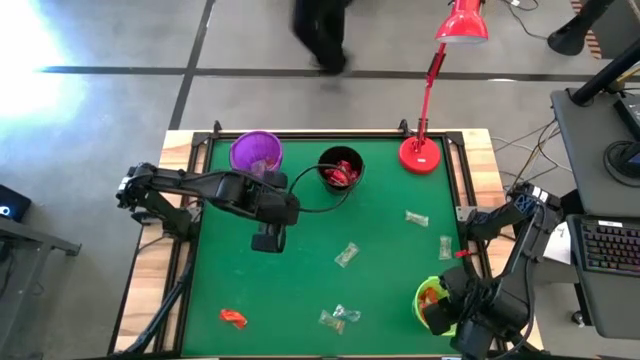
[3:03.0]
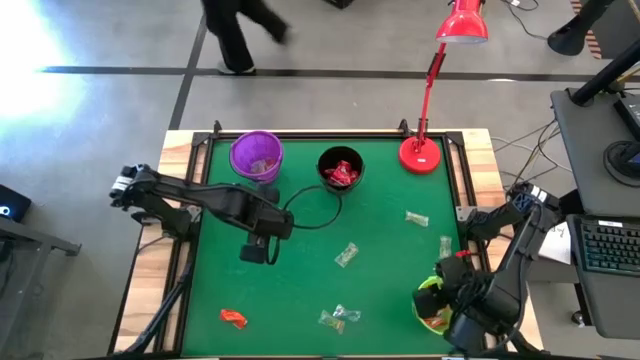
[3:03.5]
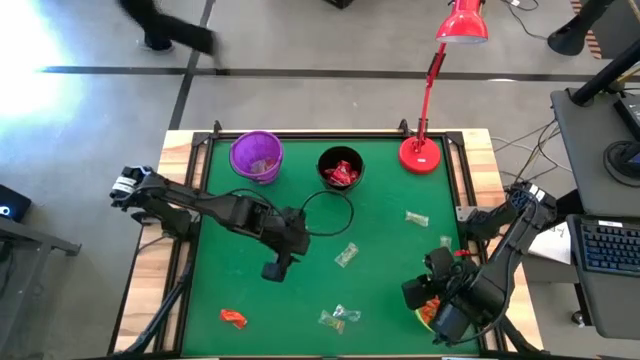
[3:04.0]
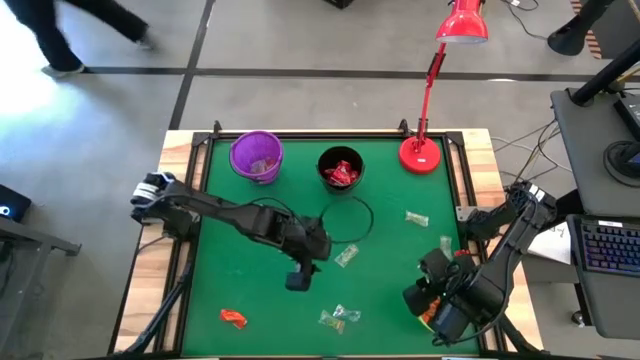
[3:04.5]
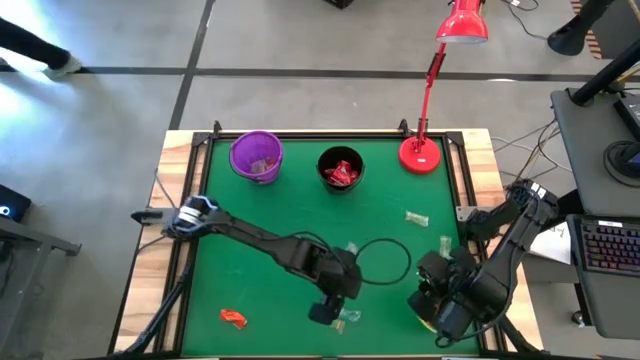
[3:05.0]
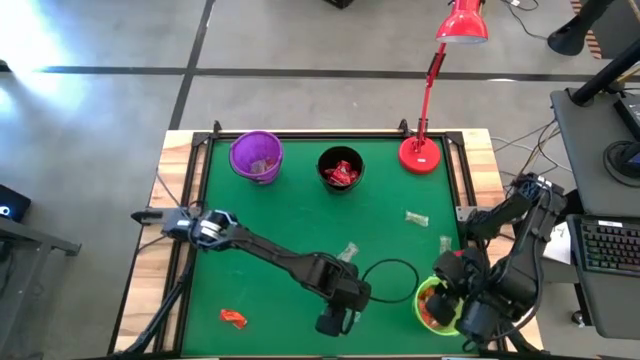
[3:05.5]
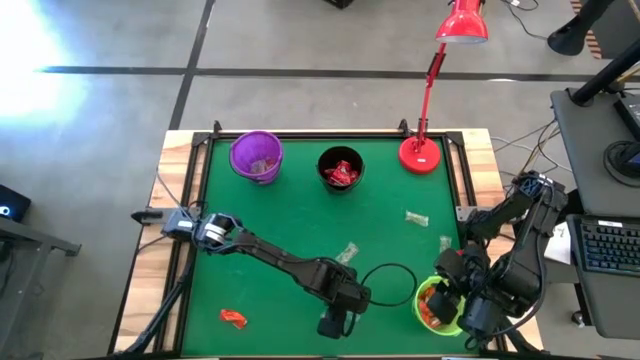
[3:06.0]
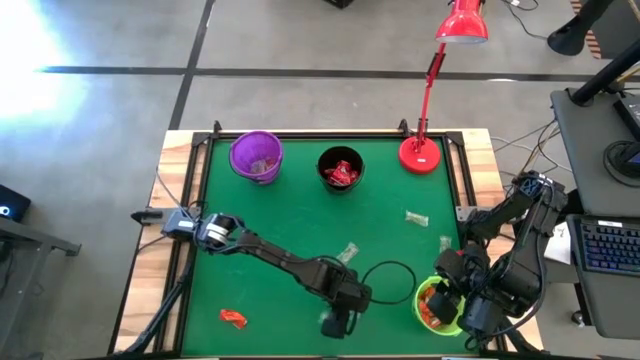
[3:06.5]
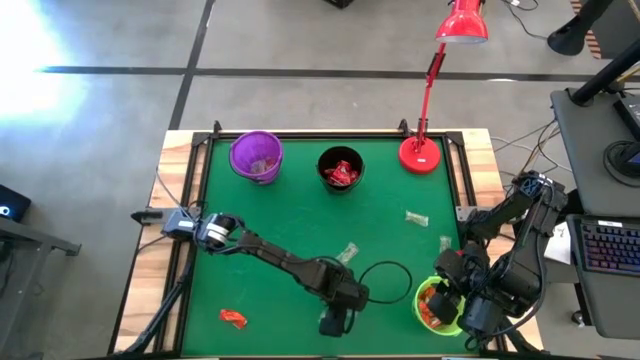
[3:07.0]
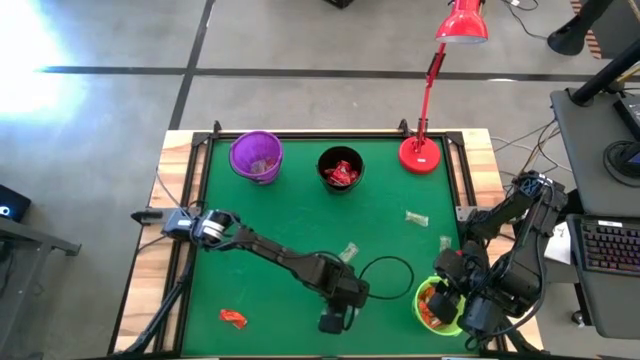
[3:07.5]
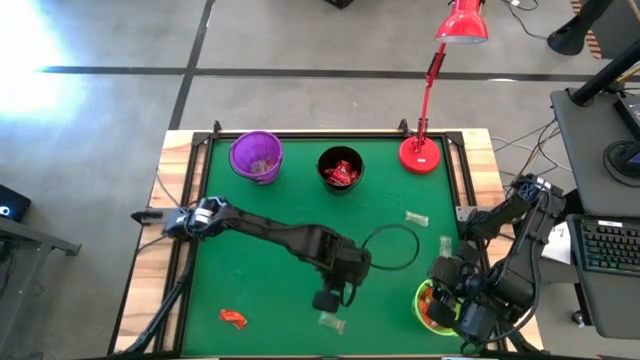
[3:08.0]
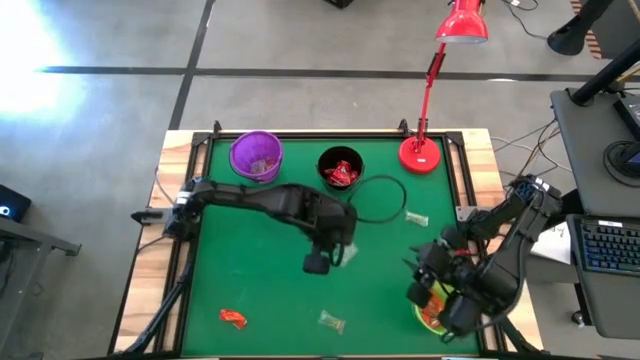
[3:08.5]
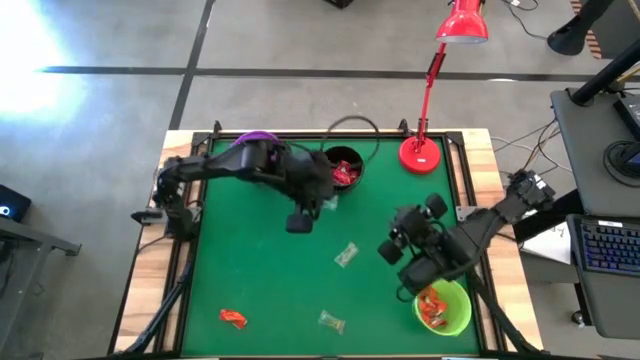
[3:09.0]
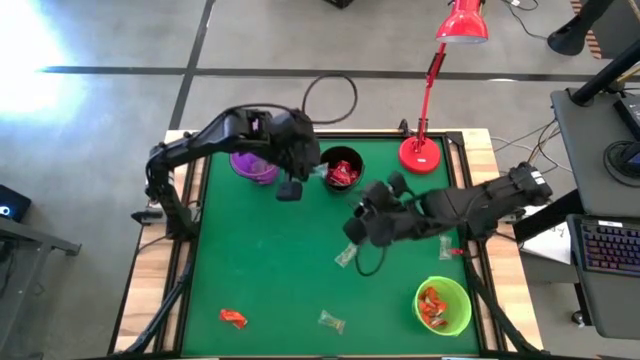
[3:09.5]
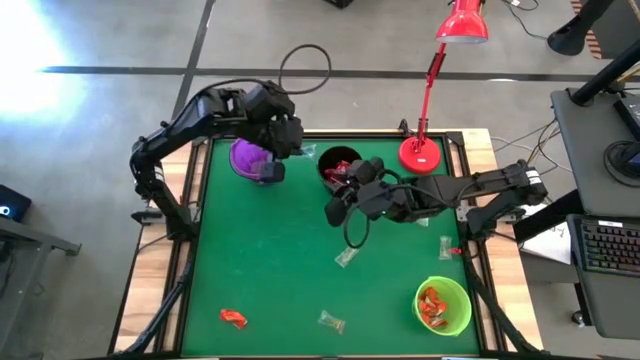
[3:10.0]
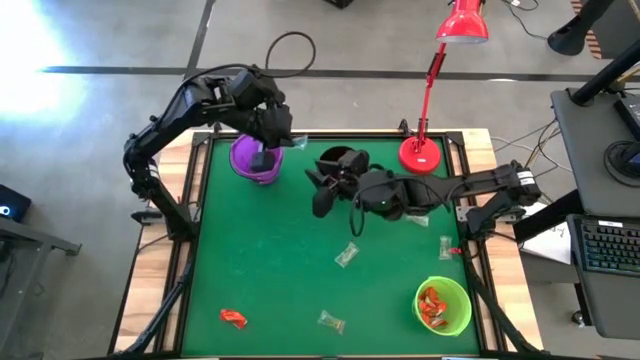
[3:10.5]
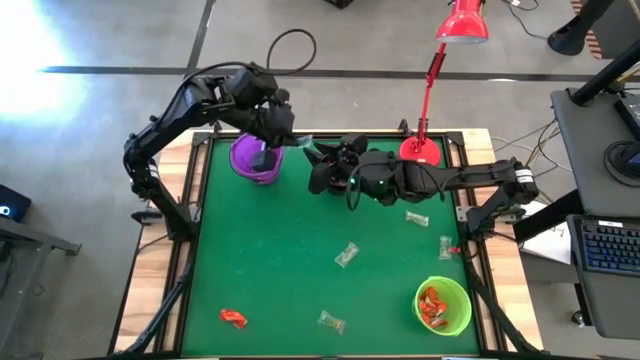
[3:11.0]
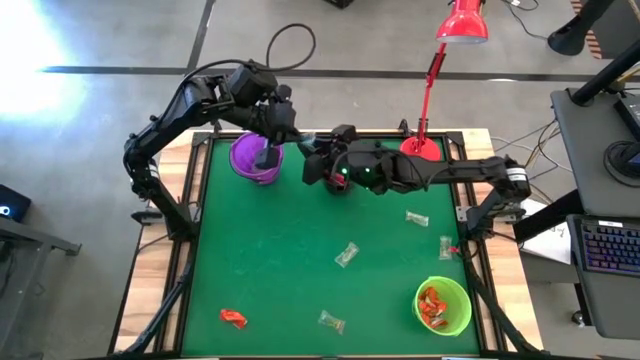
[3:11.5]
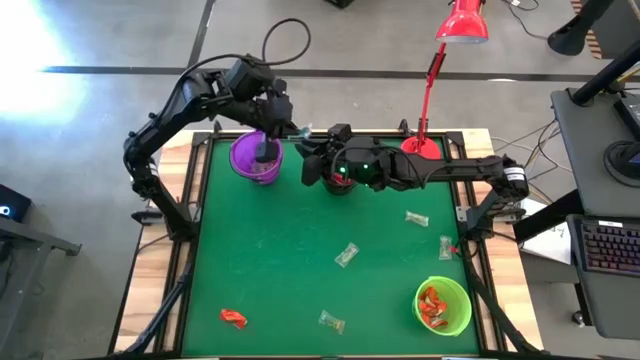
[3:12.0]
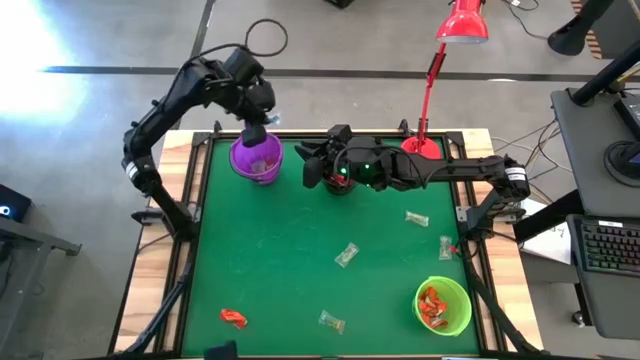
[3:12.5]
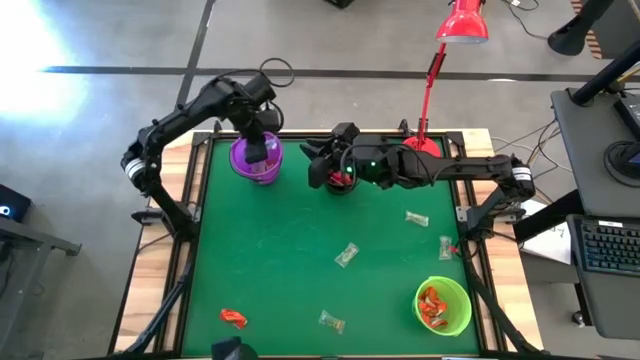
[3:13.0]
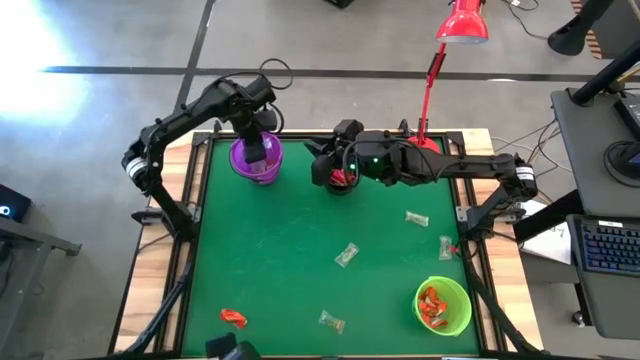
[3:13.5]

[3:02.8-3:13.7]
Task: Sort candy
Put the blue gummy into the violet bucket

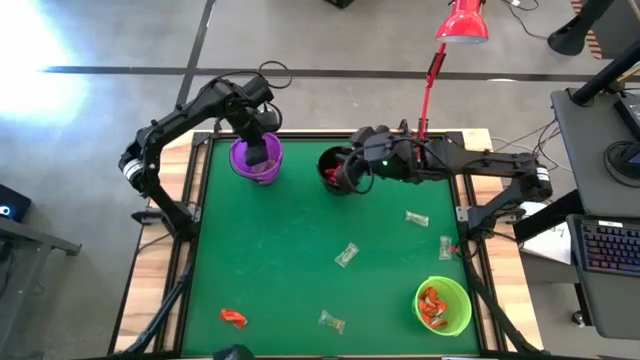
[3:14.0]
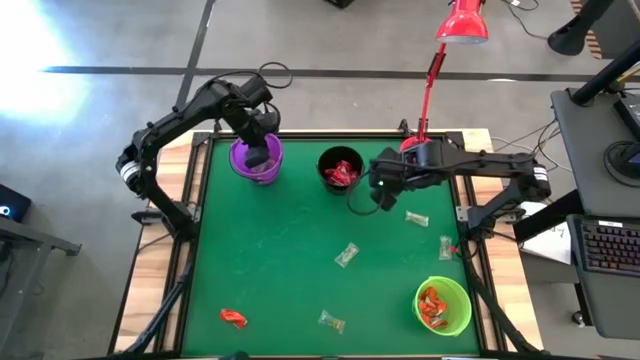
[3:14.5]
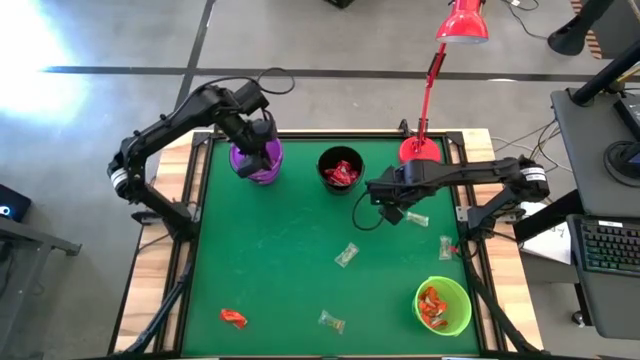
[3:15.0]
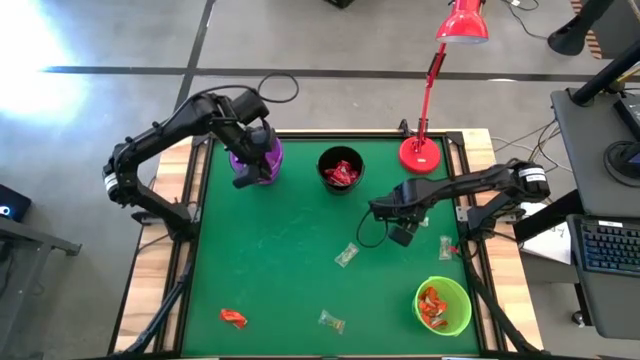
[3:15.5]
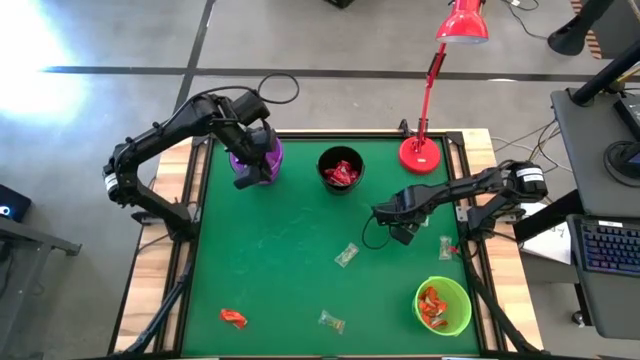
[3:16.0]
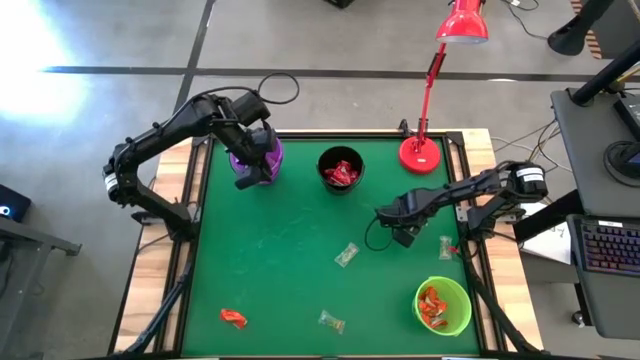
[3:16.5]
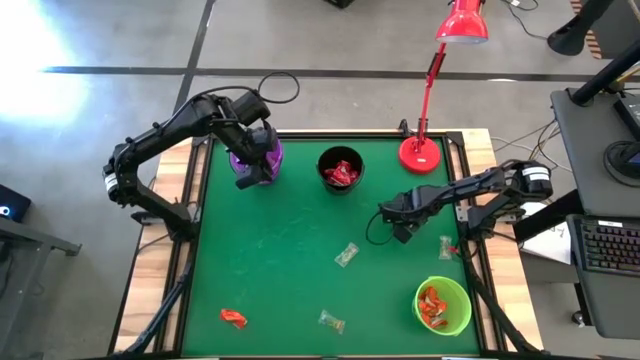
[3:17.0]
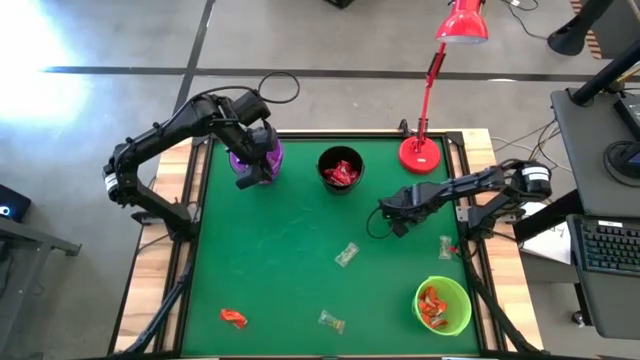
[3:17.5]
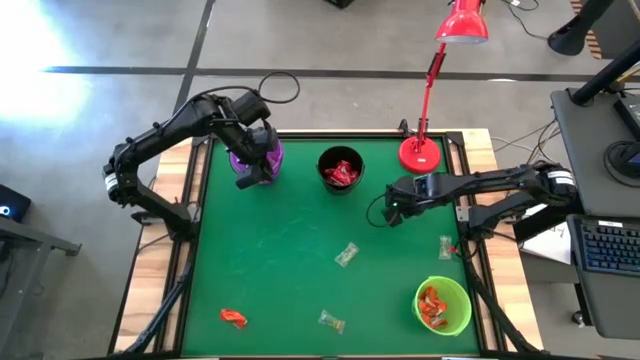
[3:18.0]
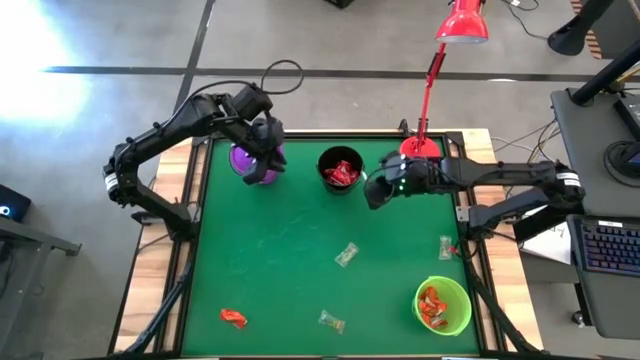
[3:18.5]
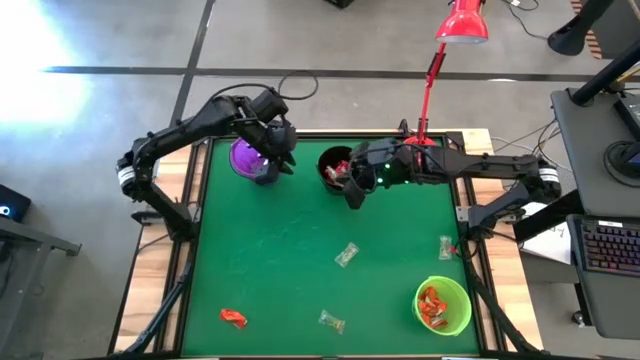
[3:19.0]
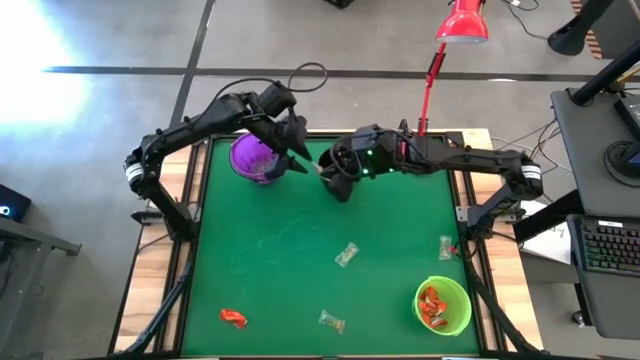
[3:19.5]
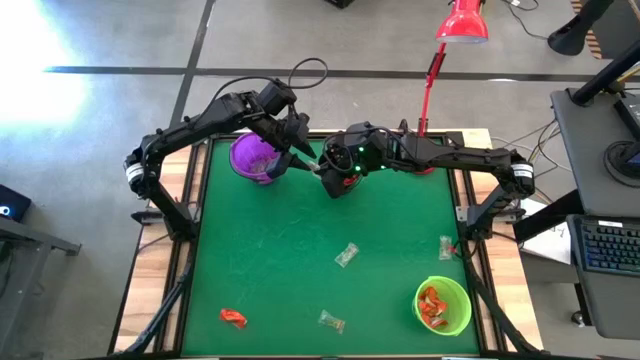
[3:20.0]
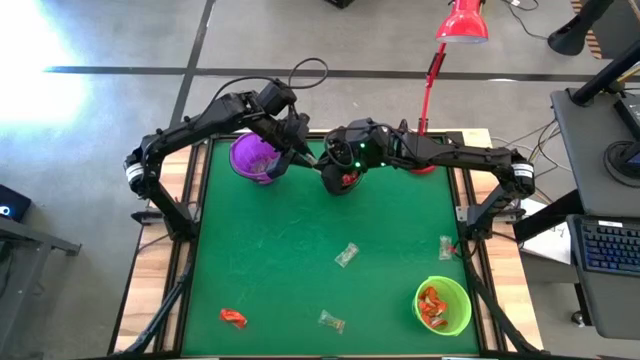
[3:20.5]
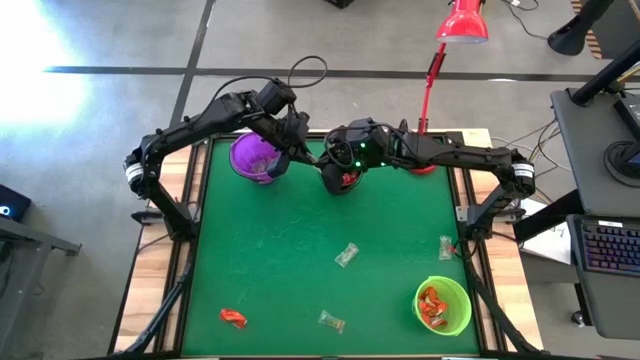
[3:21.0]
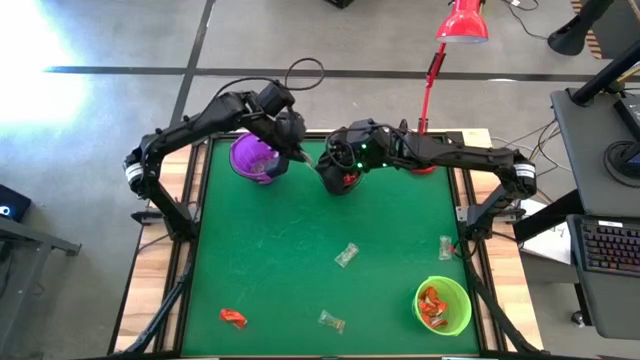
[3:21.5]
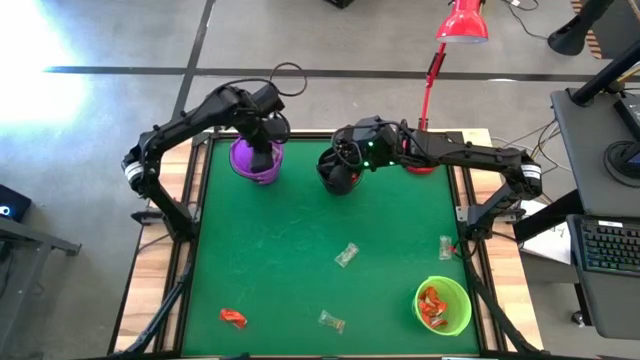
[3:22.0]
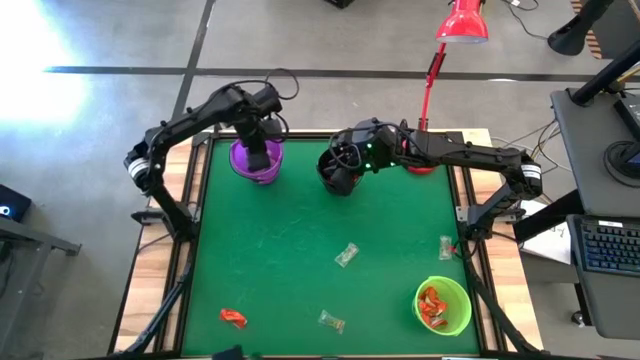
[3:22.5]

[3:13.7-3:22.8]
Put the green gummy into the violet bucket
